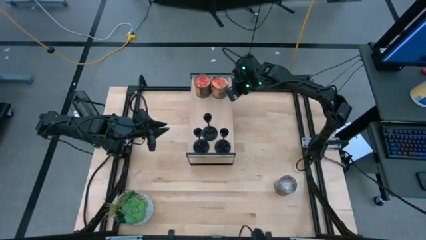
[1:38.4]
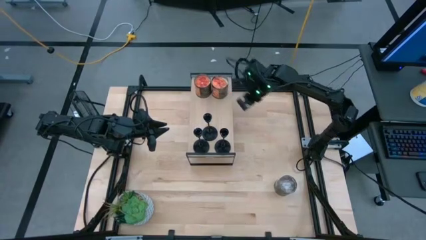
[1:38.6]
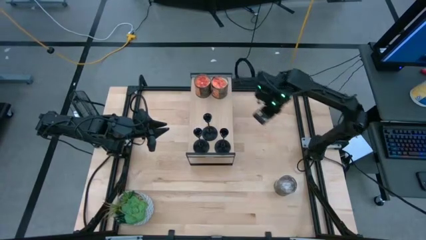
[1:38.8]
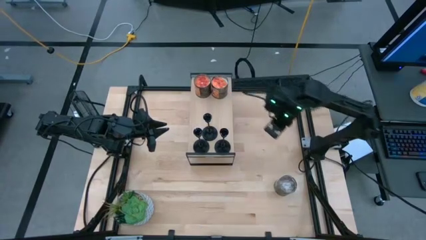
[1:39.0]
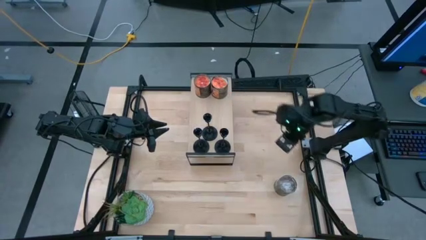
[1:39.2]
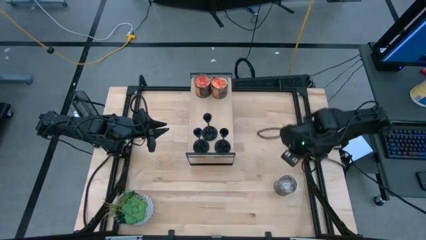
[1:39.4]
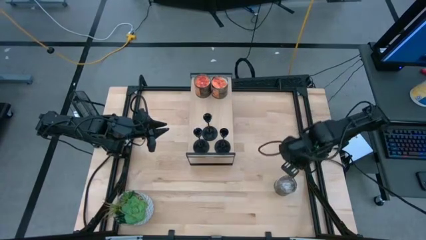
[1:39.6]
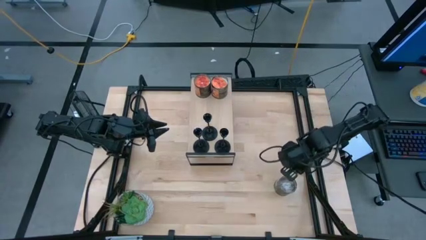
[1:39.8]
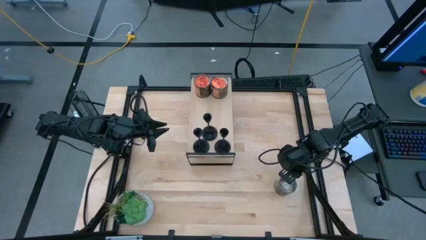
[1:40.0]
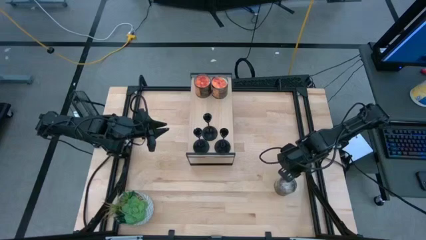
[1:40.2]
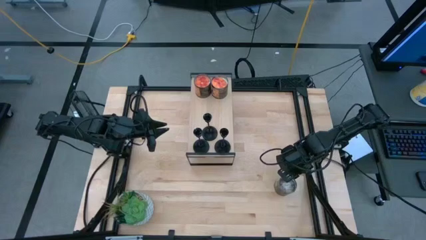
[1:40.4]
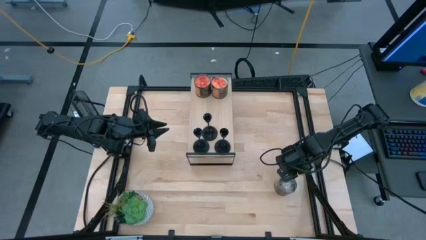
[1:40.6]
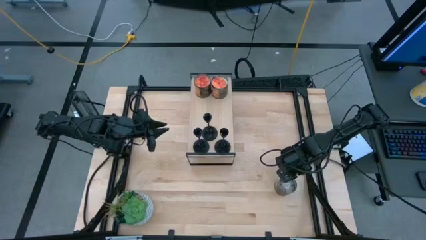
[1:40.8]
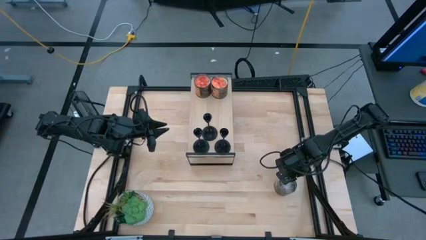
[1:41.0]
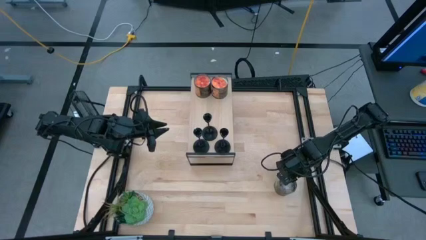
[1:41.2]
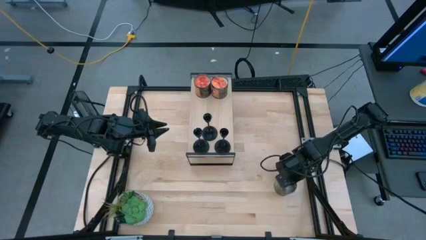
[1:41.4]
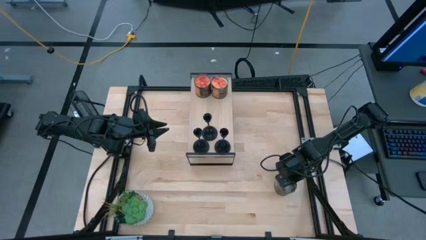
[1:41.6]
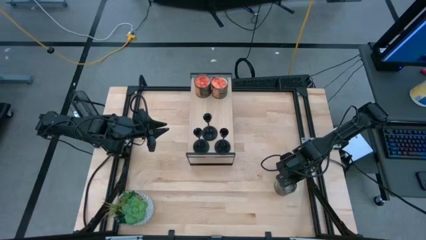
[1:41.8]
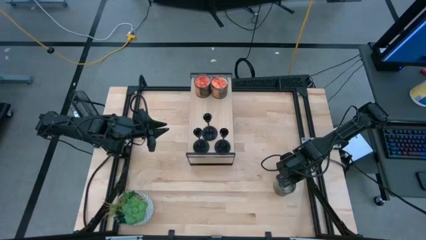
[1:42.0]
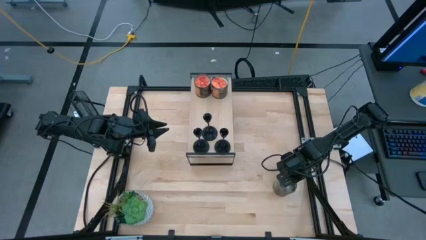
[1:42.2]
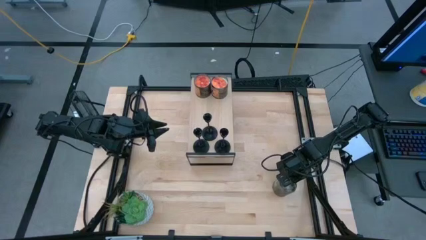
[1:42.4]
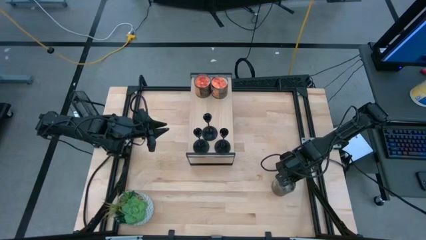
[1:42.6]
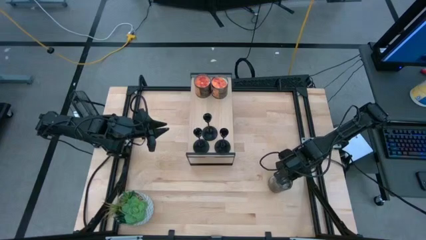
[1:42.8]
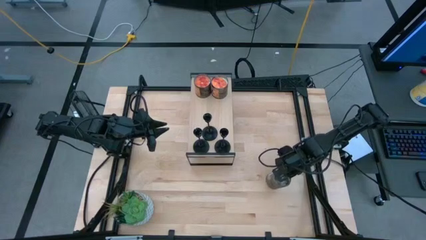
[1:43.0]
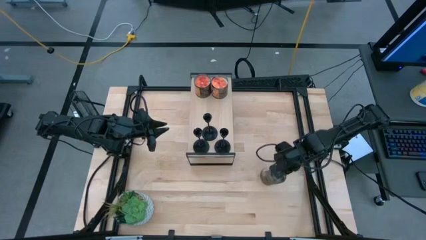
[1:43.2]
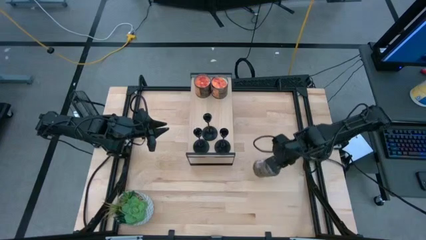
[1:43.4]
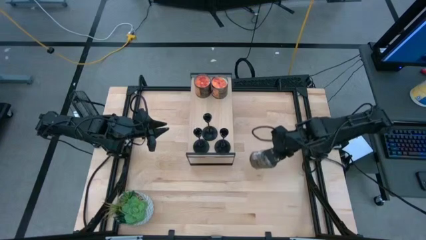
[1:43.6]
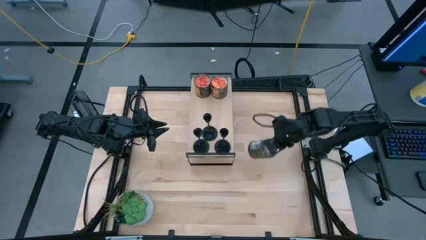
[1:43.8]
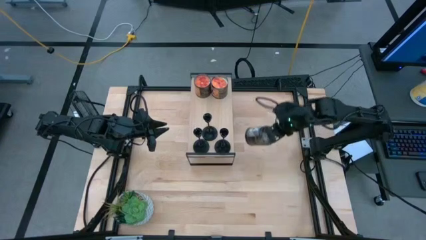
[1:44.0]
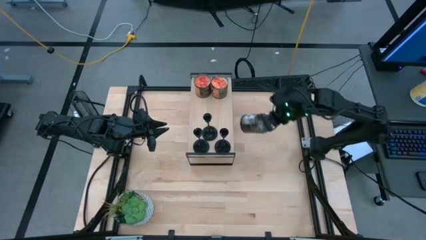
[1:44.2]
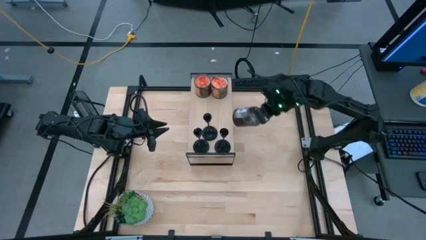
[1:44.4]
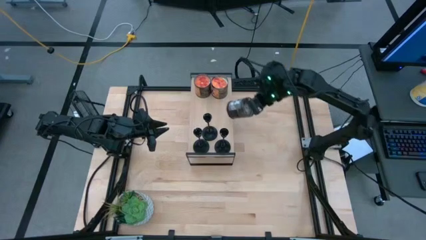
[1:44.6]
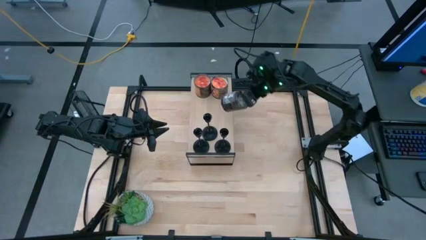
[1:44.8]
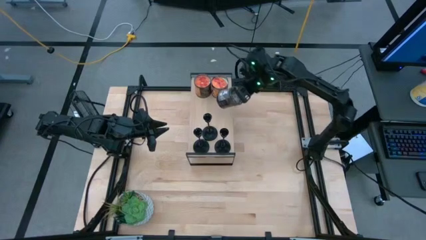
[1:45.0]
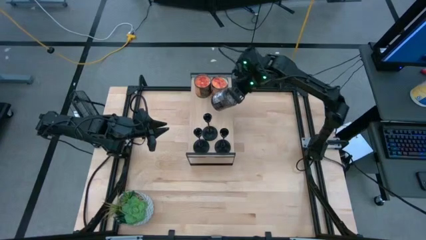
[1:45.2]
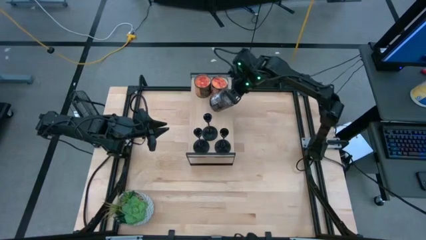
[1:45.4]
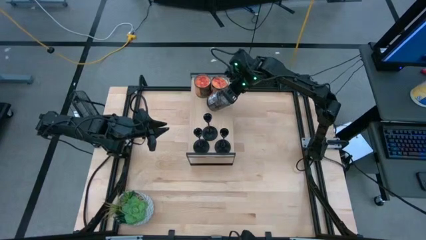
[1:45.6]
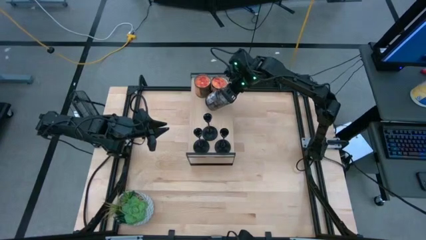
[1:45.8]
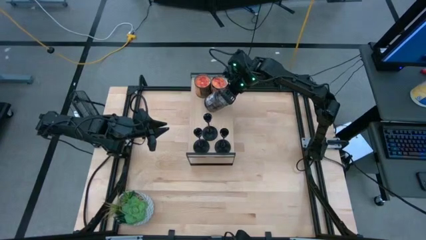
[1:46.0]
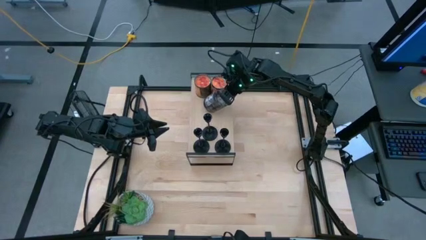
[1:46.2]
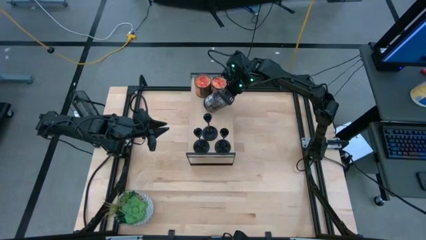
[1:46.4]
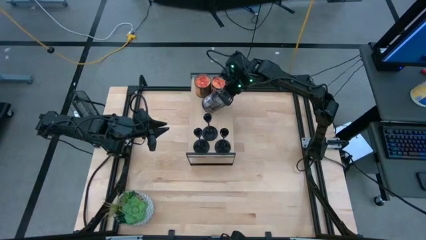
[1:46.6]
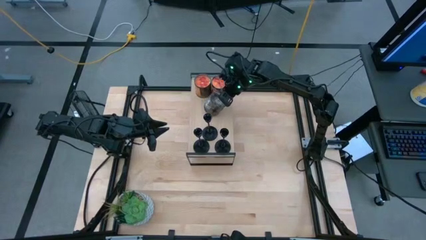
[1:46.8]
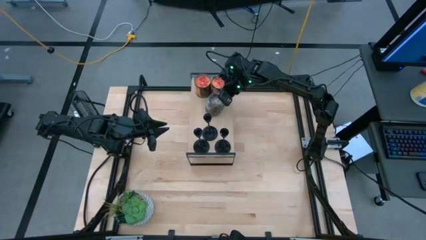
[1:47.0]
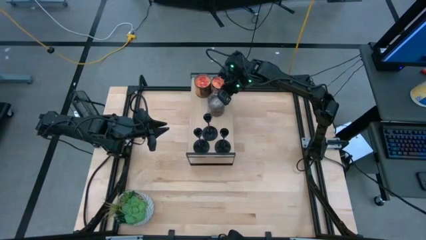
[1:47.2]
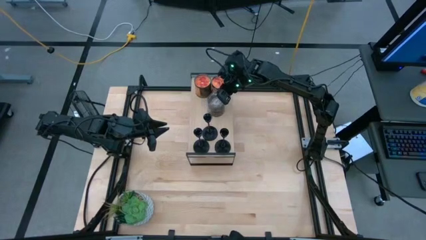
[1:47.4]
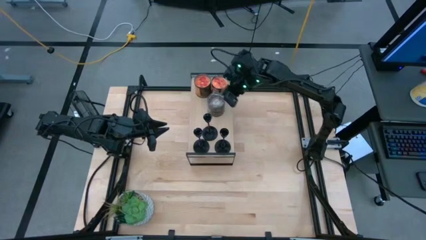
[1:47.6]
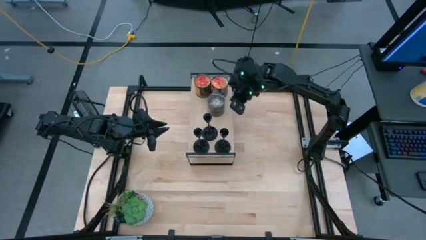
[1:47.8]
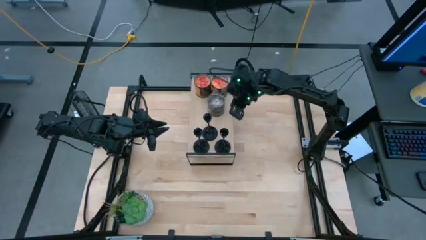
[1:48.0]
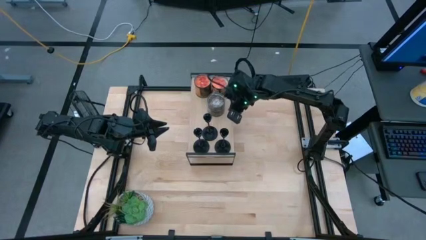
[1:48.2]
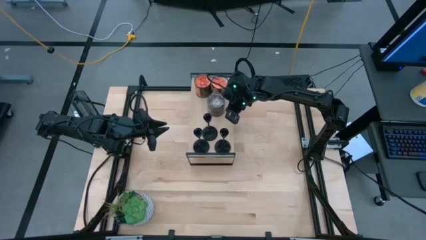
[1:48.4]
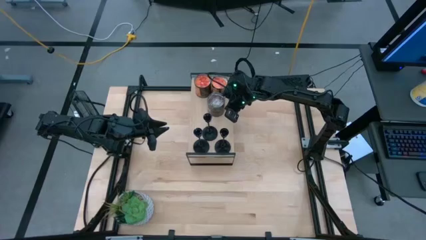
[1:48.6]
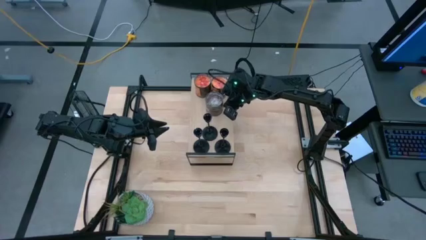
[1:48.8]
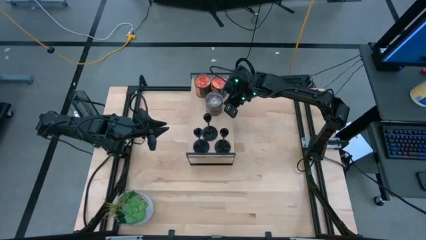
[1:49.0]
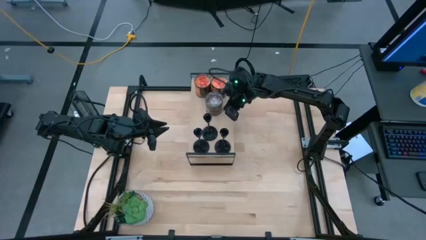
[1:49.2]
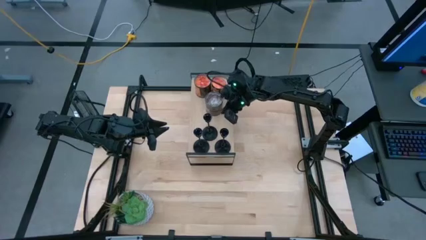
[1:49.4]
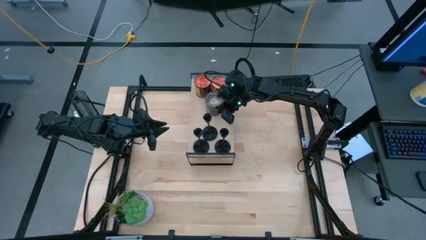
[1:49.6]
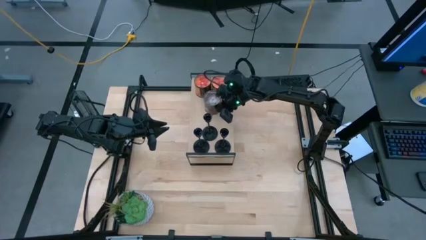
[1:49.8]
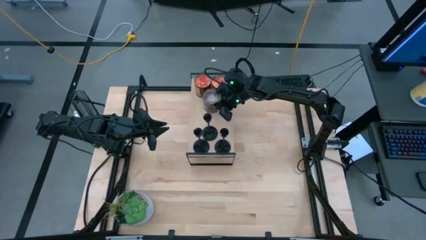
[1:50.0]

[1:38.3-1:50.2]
Task: Pick & Place candle stick holders
Put the brown scented candle on the shelf

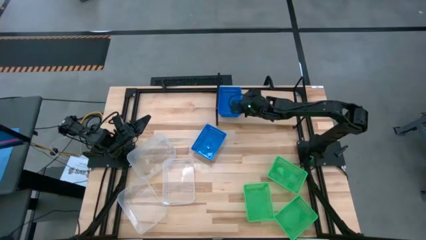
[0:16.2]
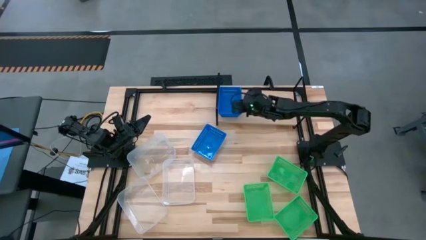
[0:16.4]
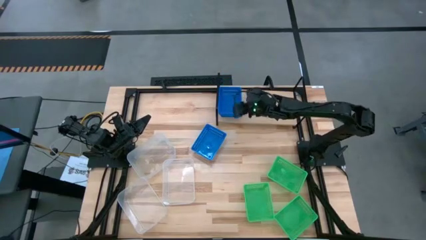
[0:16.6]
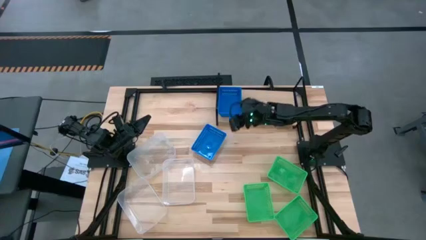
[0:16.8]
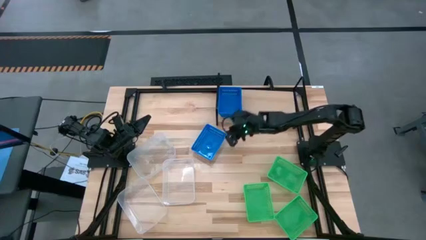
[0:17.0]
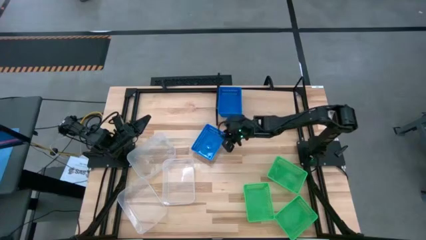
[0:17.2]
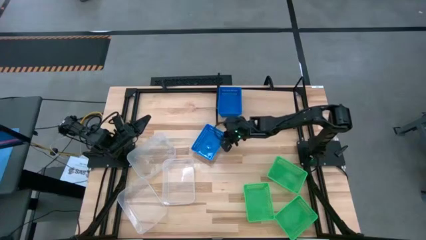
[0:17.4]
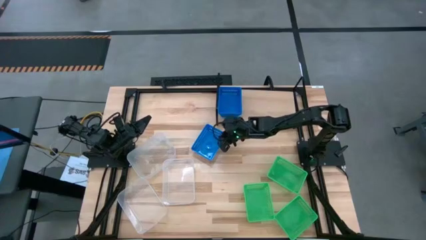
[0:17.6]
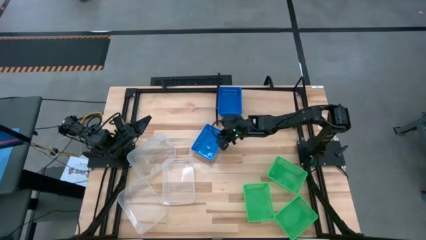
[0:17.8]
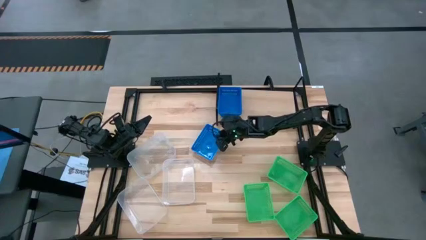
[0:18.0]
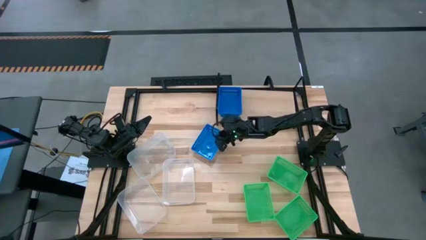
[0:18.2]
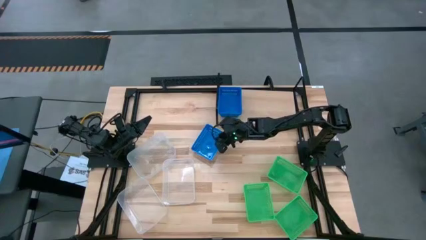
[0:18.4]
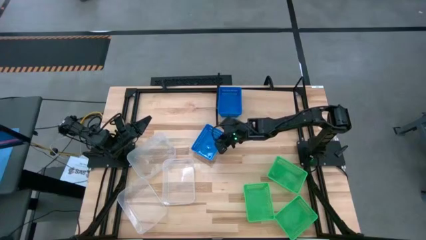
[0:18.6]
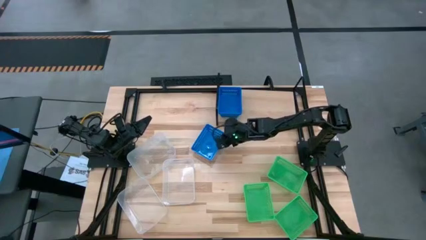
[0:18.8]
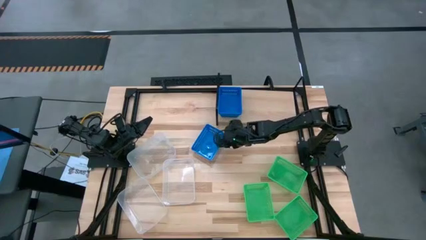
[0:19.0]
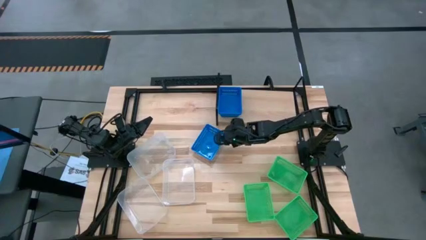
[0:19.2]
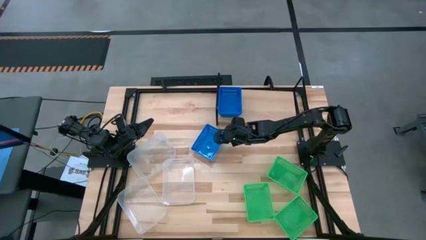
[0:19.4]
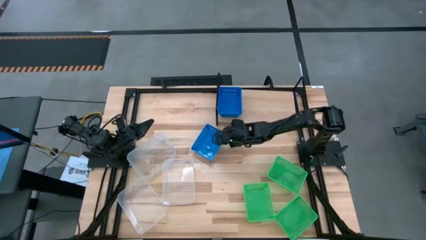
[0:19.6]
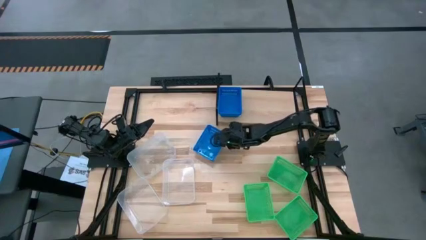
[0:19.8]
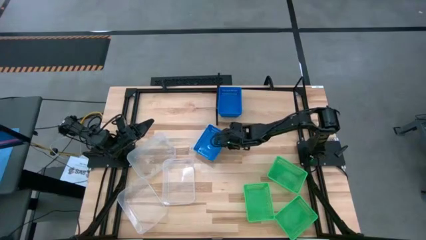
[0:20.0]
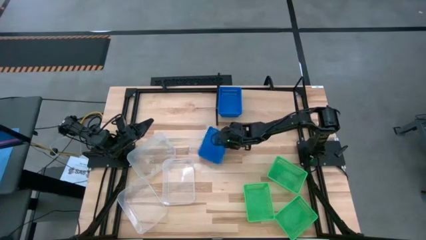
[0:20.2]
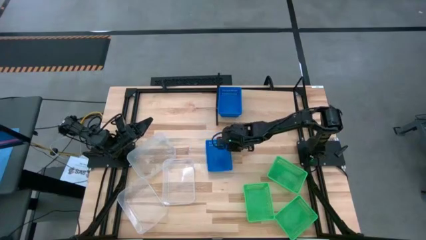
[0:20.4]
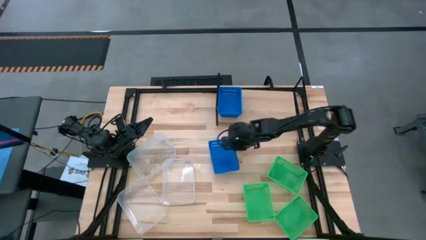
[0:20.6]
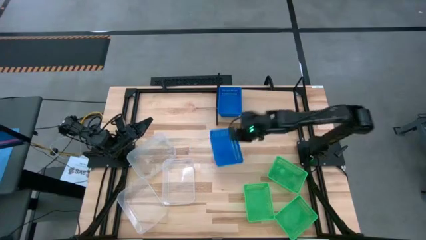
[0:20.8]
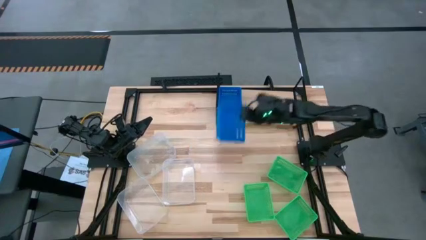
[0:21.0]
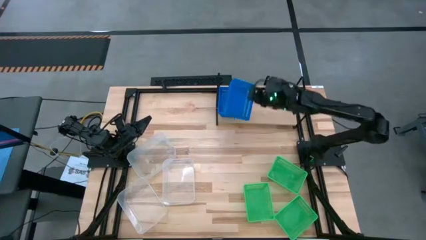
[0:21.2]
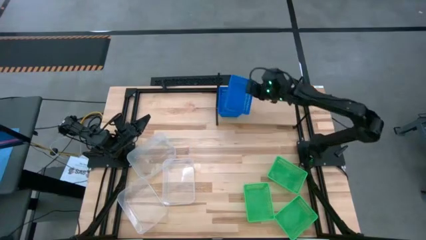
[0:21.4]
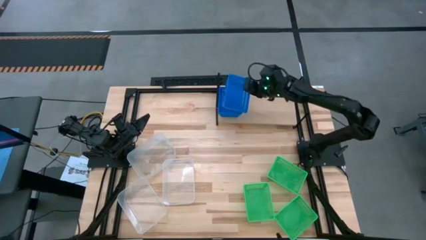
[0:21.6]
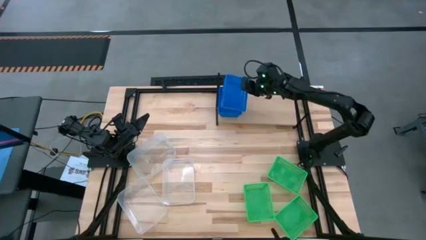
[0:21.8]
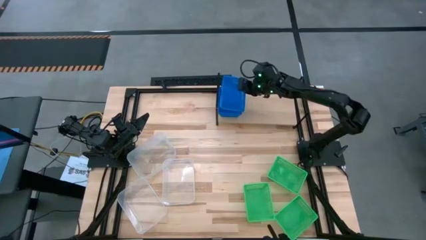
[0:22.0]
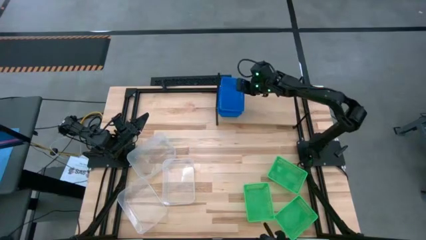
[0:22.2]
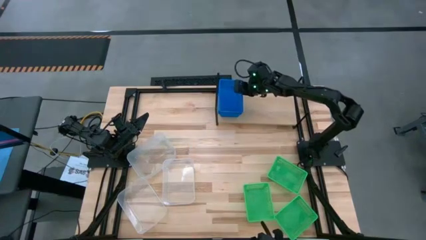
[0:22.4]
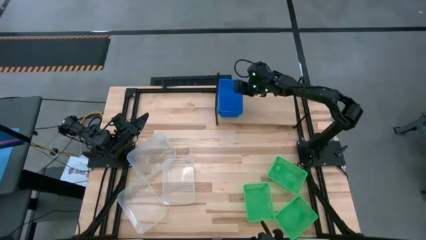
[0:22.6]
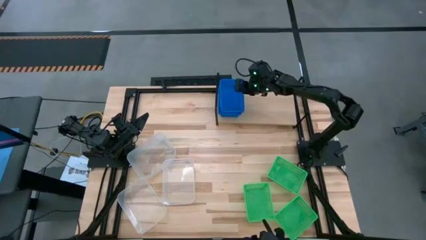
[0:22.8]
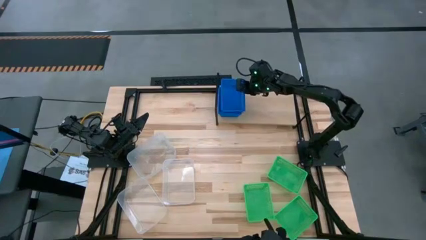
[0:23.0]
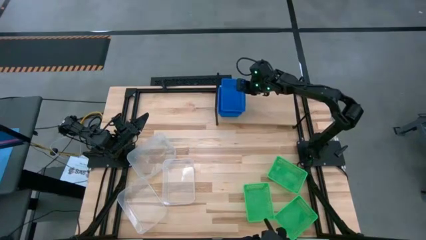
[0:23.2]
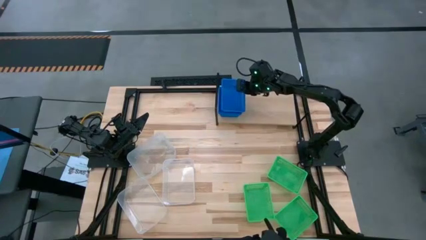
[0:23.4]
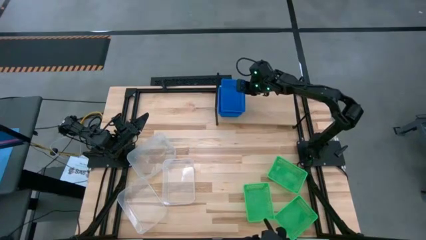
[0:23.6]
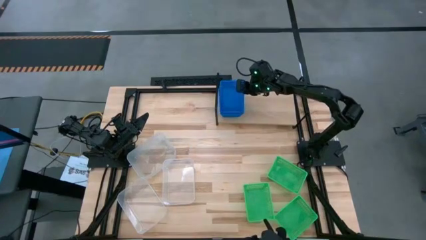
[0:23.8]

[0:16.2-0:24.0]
Task: Stack baskets on shelf by color
Stack the blue bin on top of the blue bins on the shelf
